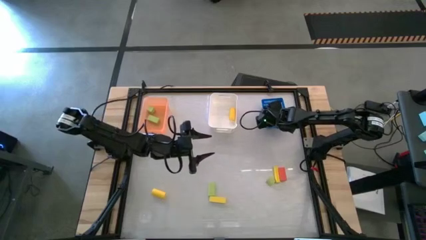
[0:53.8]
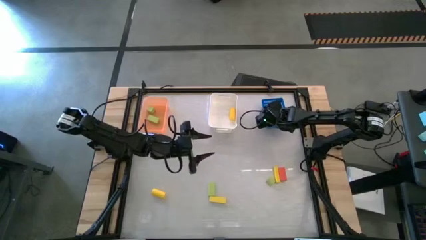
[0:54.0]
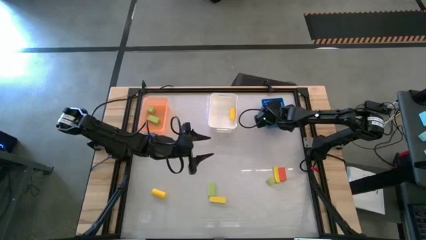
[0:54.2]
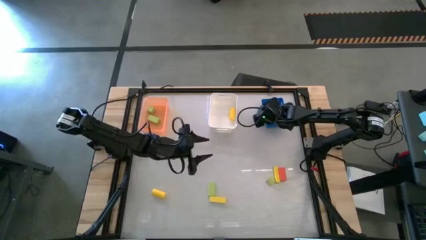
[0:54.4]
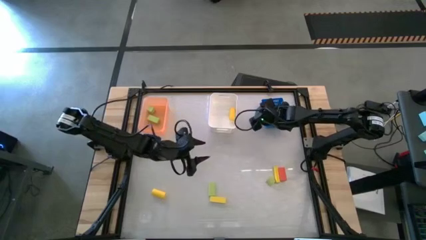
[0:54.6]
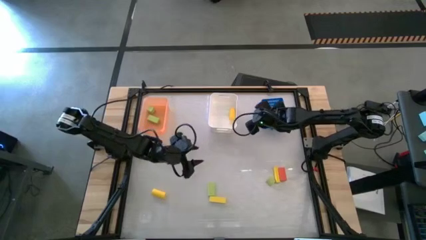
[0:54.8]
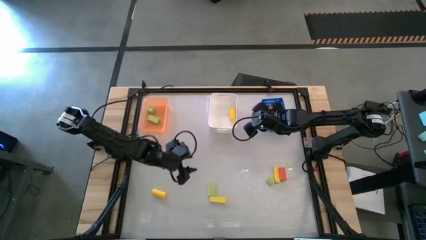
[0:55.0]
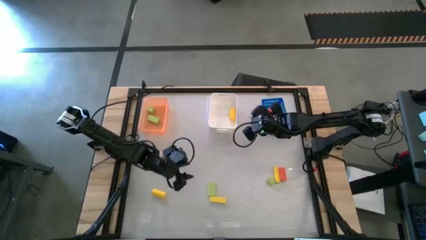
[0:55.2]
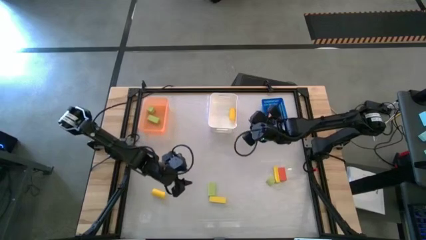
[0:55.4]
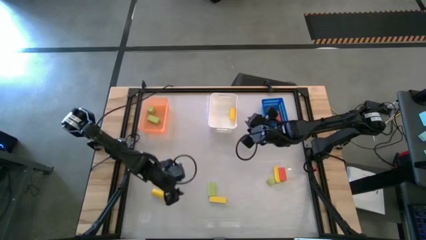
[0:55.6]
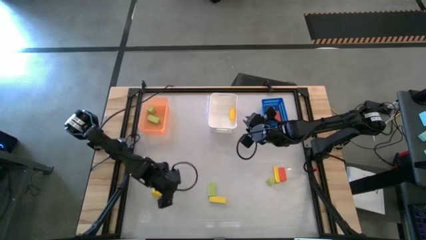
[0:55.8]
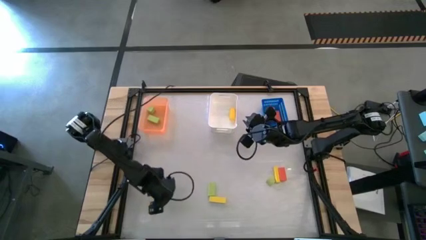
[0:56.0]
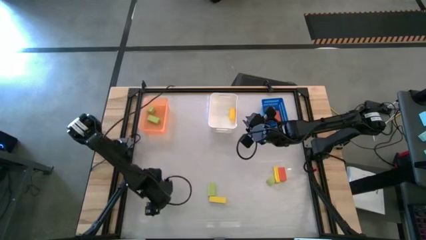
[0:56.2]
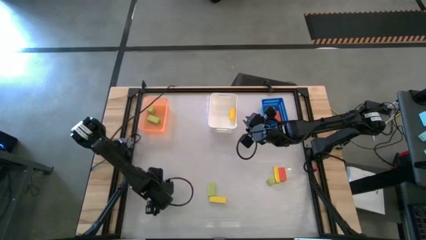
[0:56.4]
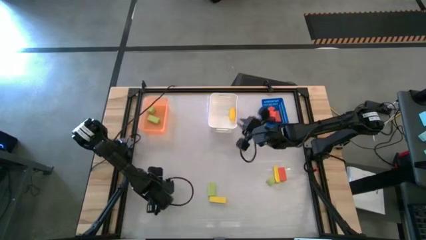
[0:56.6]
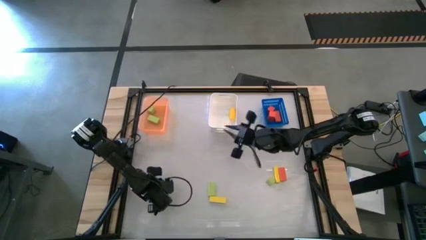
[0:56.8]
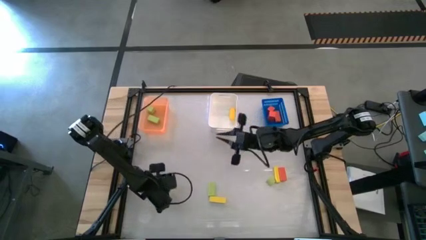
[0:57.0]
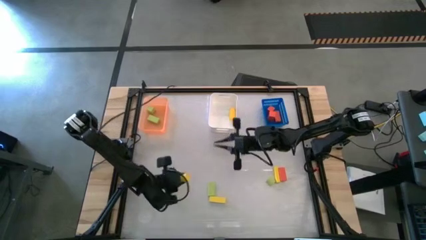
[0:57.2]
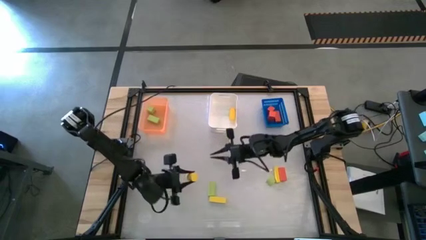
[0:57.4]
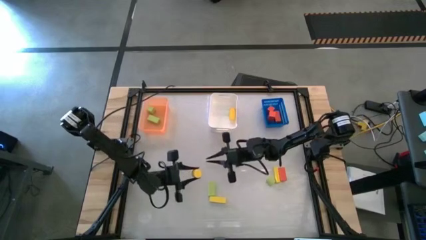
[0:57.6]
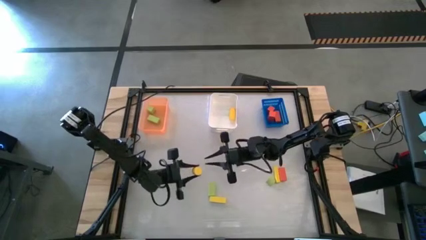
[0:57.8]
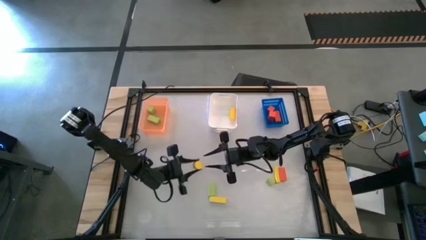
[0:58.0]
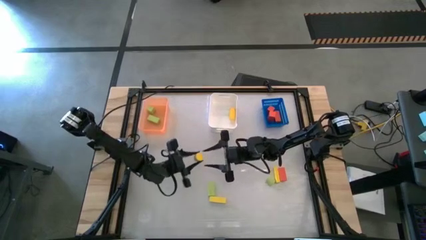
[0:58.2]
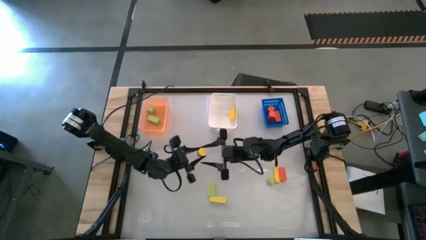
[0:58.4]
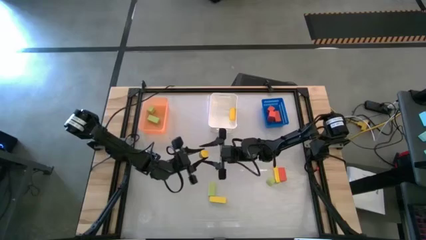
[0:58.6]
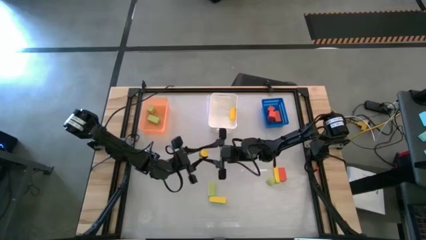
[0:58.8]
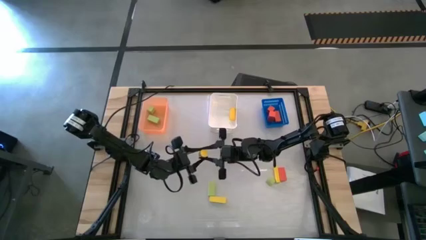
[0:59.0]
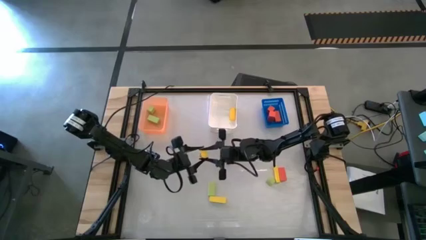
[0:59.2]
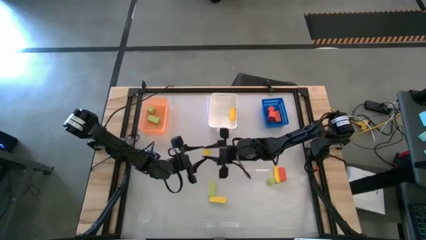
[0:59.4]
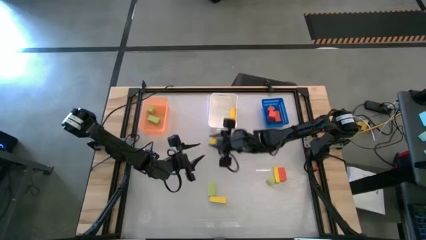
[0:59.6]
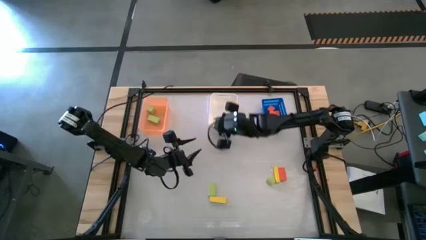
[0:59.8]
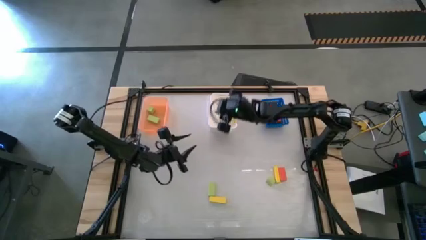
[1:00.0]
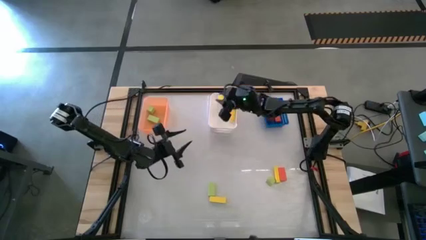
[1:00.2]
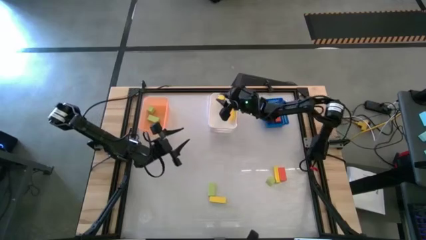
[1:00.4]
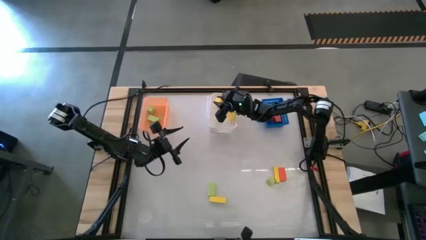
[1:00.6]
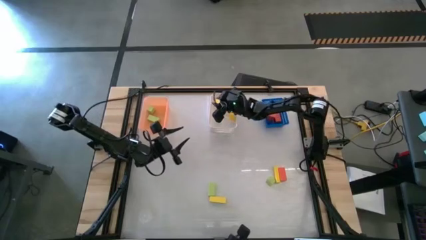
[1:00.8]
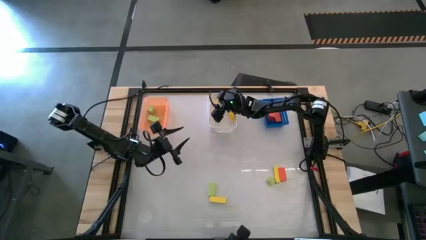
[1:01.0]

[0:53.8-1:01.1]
Task: Sort & place blocks by color
Put the bottom left yellow block into the white bin

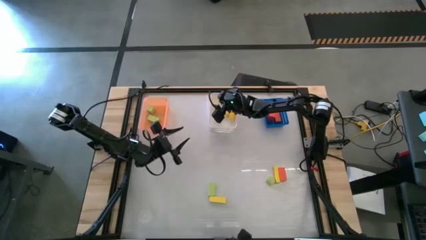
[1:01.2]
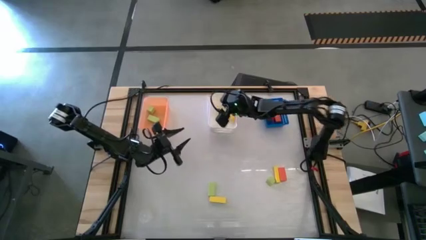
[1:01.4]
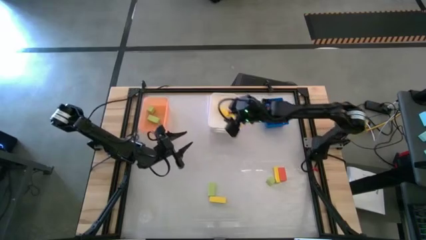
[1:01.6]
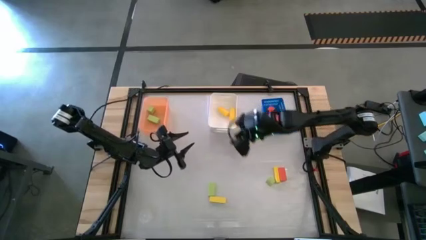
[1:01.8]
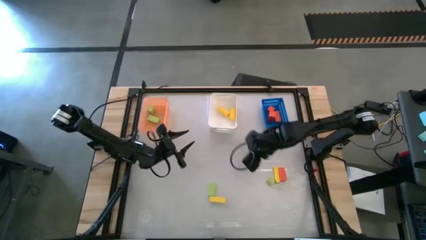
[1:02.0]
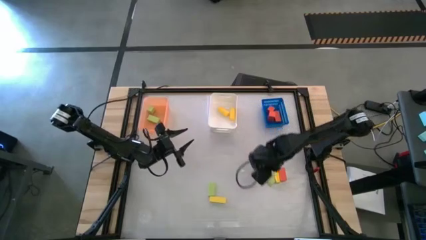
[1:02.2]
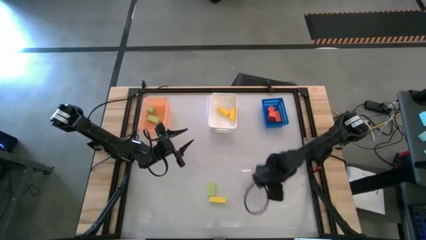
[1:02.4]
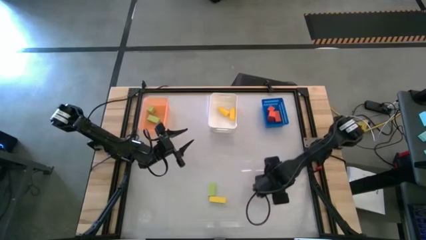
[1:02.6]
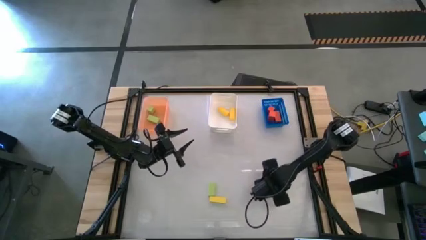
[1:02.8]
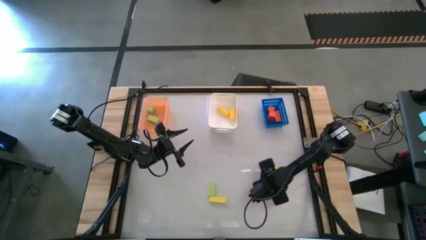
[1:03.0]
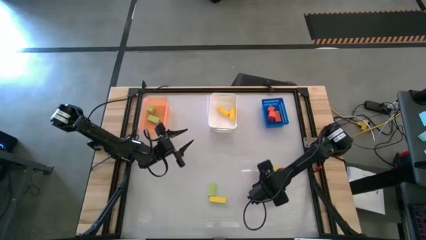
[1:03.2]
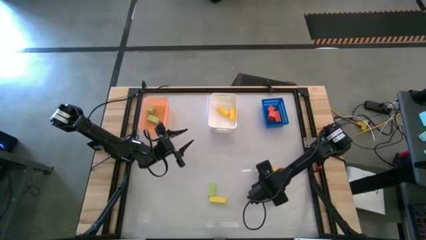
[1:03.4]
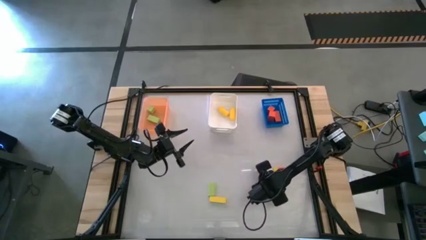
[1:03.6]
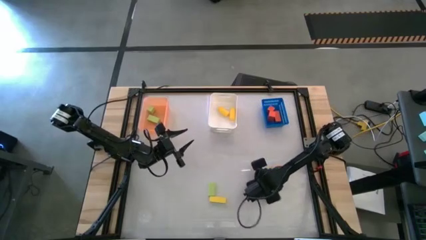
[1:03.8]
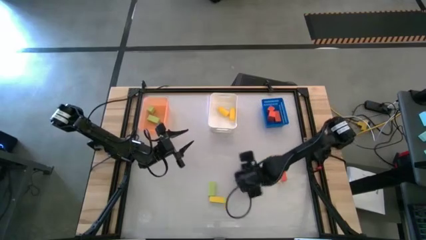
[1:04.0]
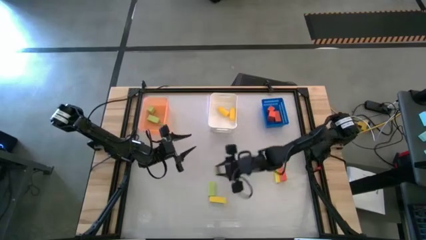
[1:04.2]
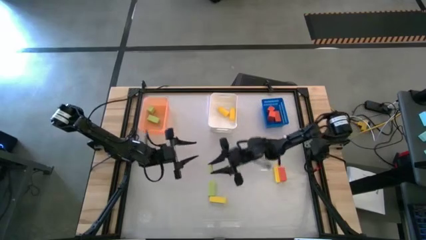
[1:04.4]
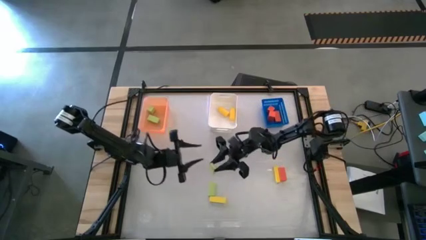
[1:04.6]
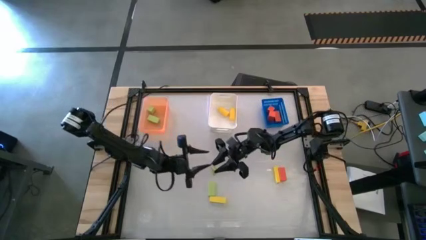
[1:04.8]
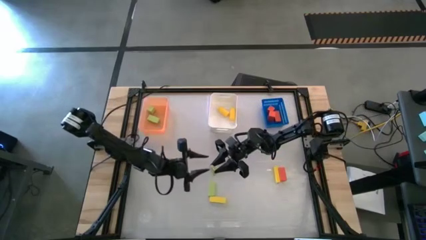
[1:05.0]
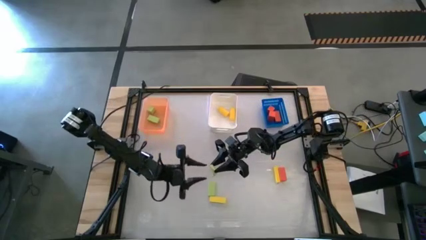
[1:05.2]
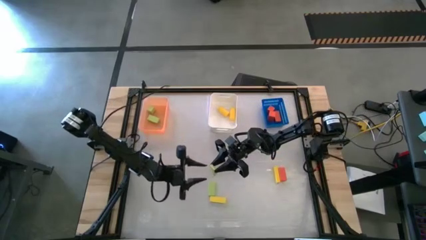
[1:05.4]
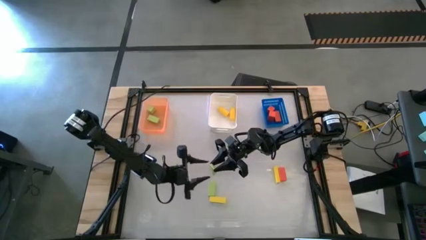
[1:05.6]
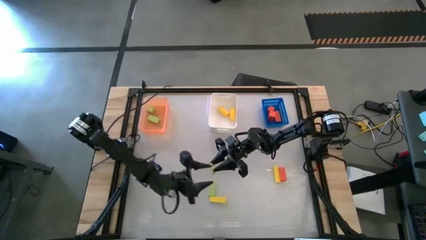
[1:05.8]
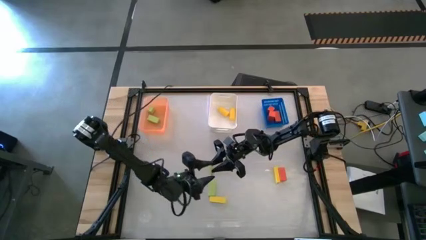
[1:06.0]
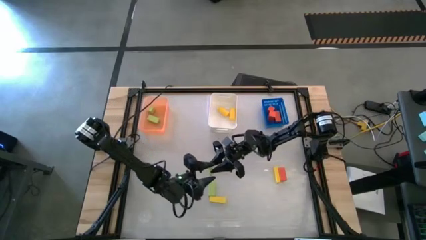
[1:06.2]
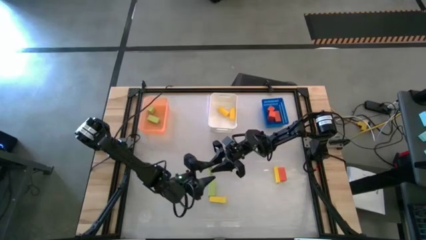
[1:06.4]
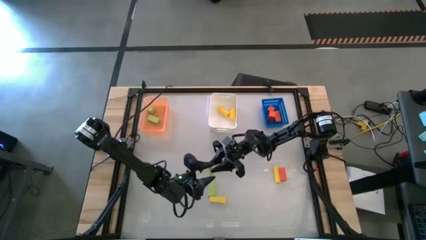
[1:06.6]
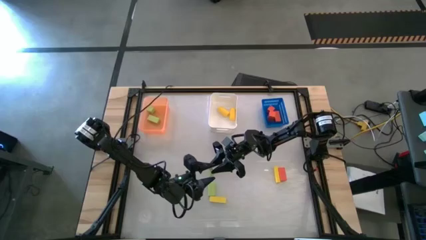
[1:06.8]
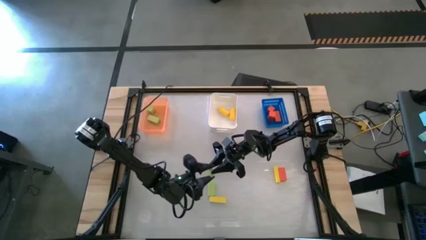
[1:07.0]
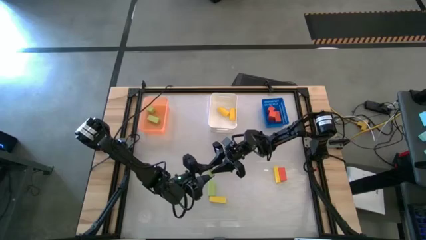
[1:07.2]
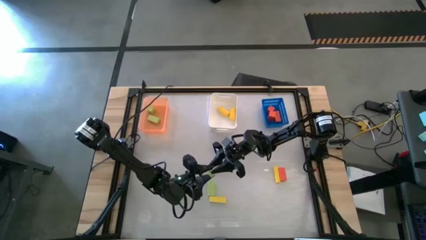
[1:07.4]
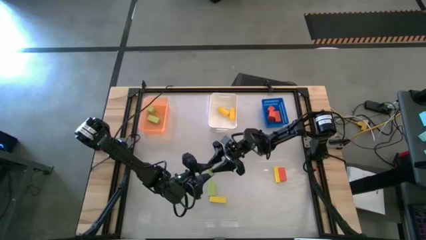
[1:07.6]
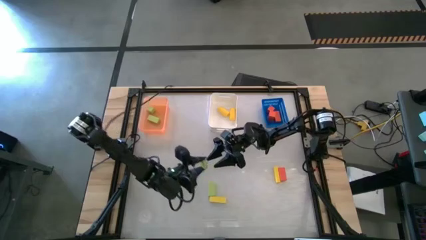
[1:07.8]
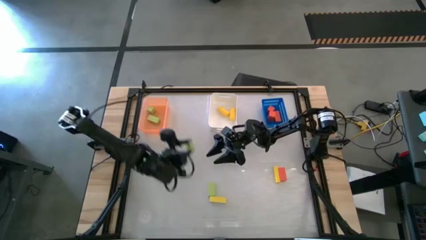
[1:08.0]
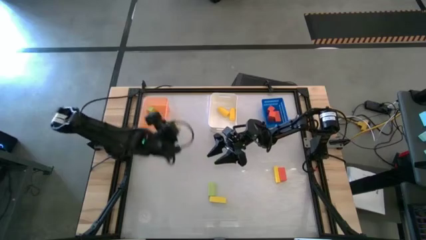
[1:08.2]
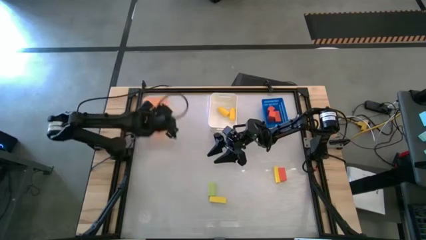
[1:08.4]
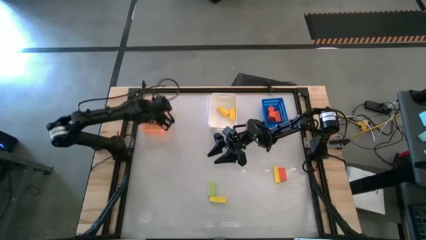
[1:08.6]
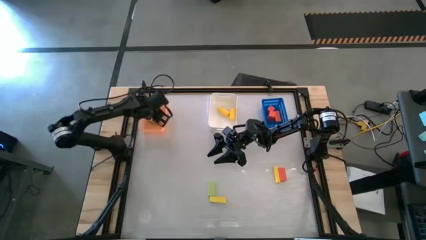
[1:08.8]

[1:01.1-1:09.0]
Put the right green block into the orange bin

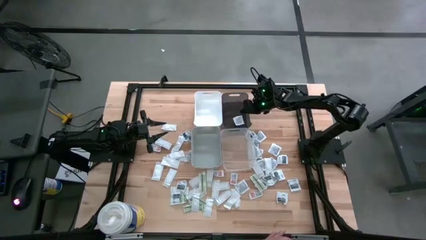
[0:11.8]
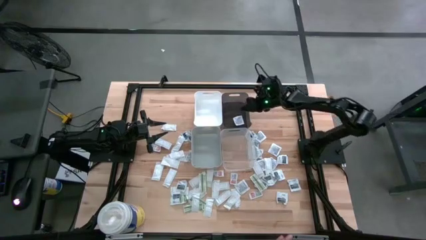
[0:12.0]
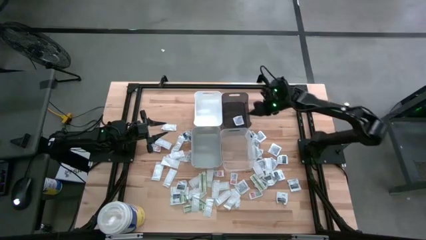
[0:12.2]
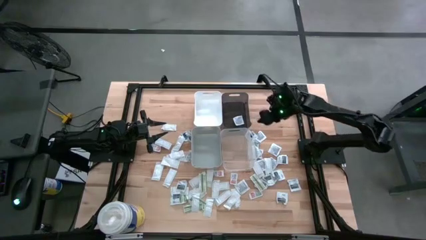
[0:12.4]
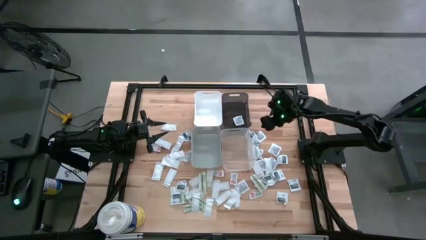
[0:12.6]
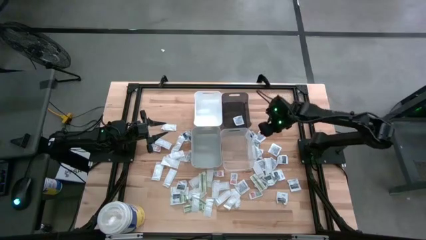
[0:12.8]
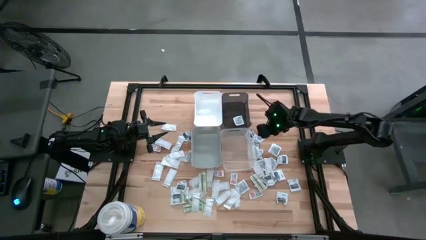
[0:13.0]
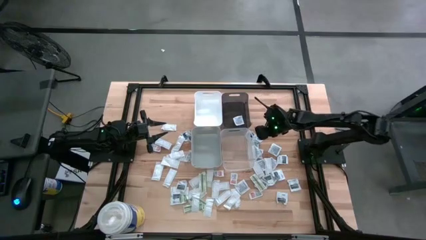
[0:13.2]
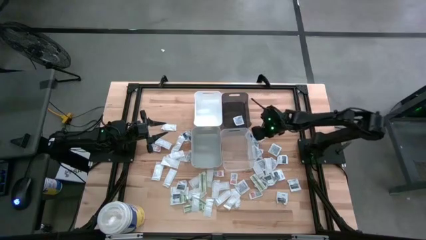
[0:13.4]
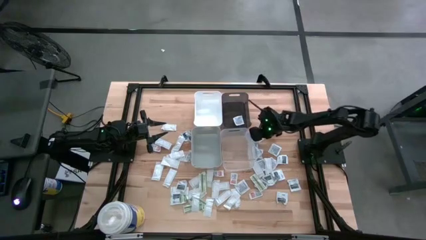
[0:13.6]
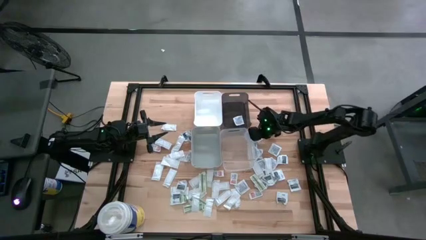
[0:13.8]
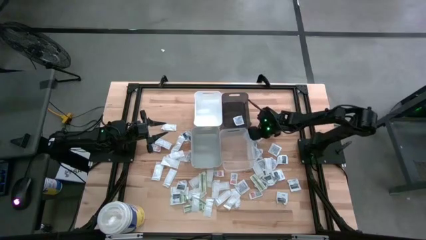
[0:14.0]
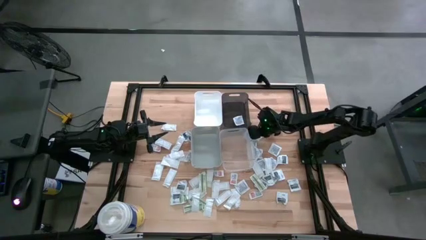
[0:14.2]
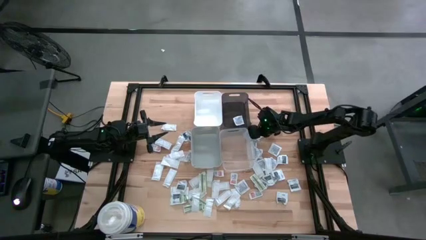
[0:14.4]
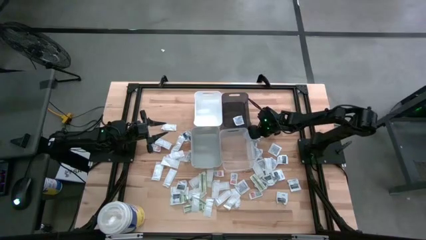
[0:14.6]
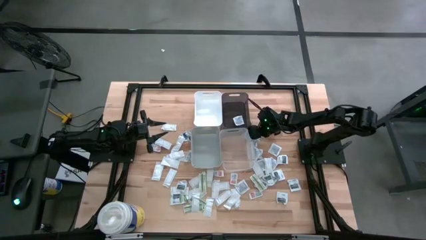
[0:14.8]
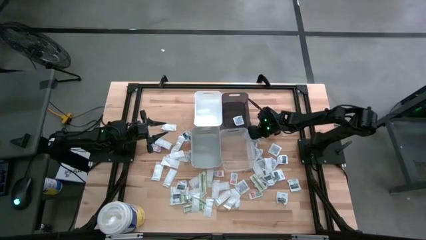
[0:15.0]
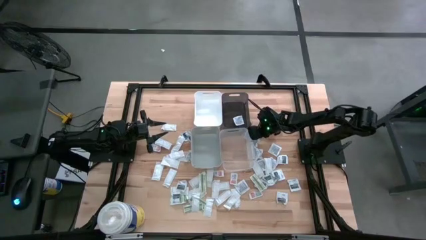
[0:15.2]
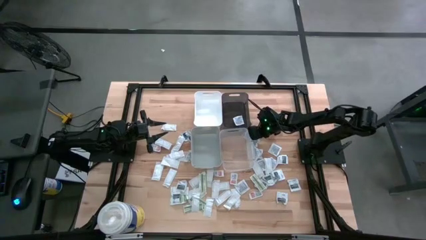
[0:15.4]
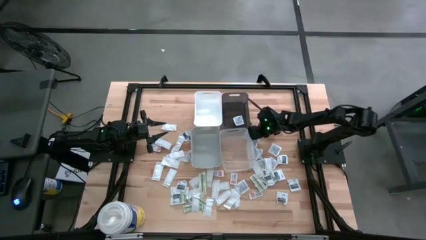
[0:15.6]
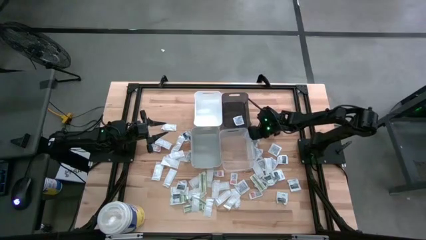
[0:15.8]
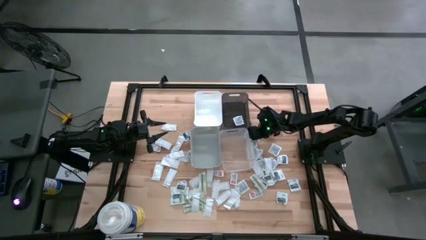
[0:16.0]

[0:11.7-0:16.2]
Task: Pick & Place First Aid Supplies
Put the blue alcohol pad into the black bin
